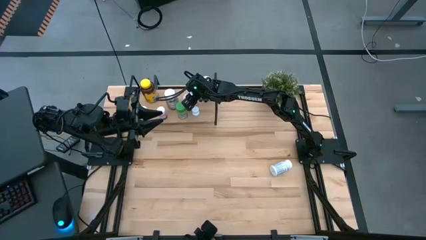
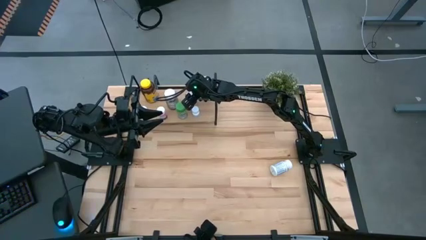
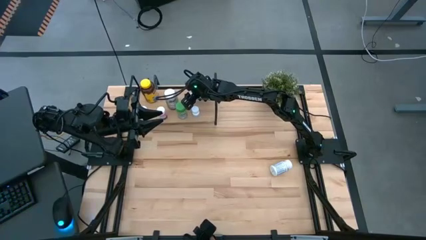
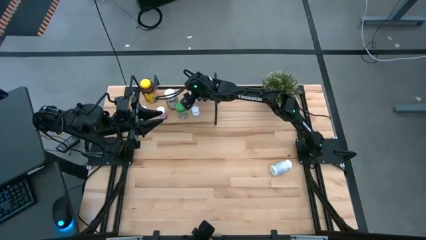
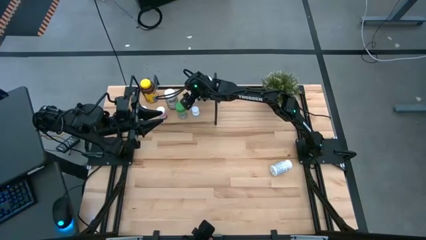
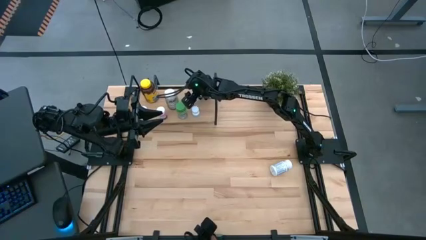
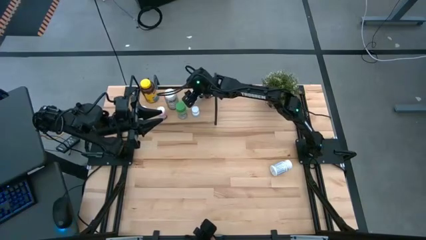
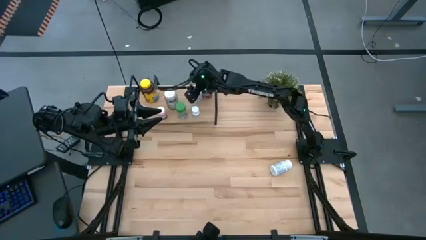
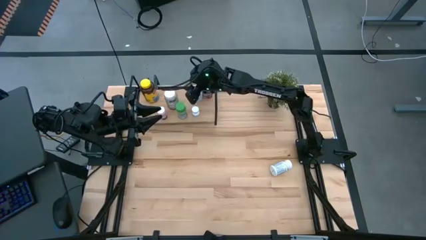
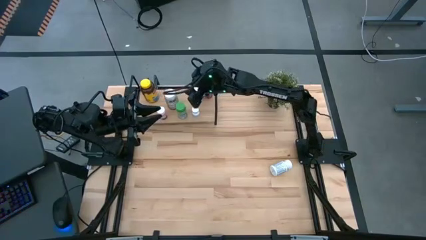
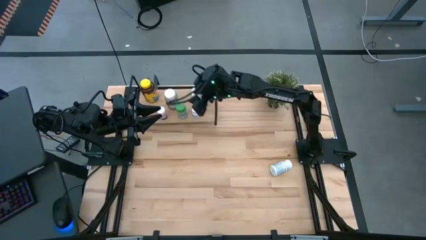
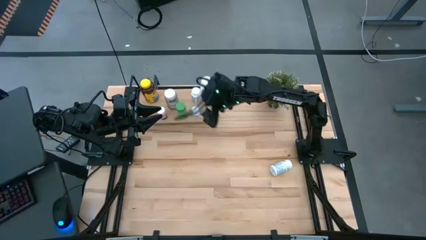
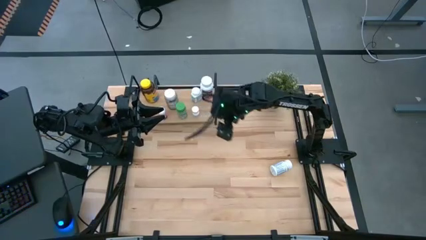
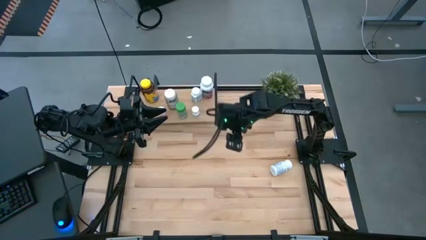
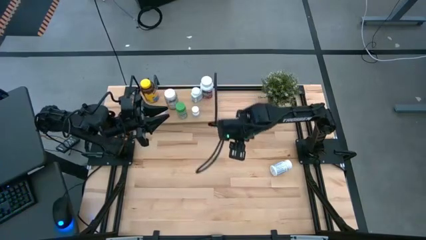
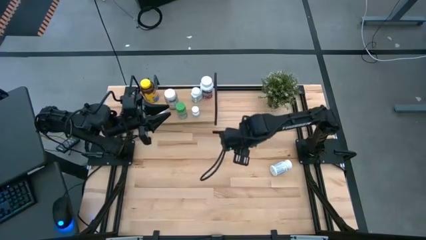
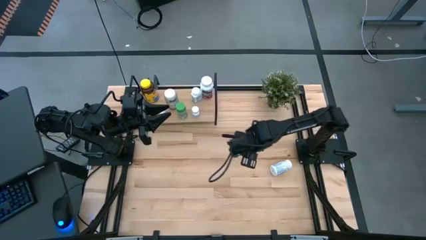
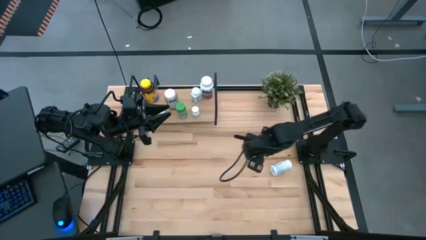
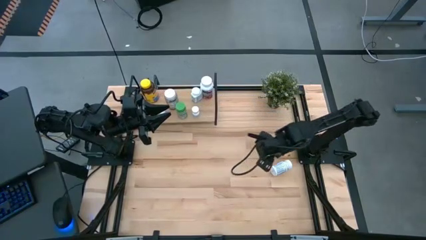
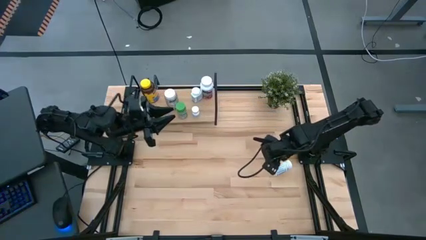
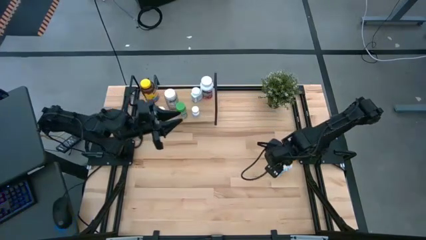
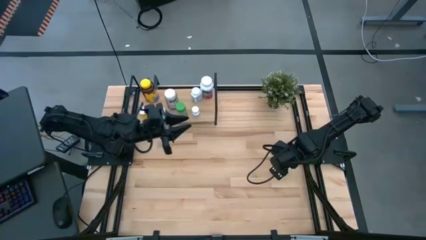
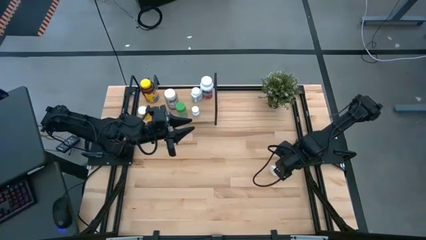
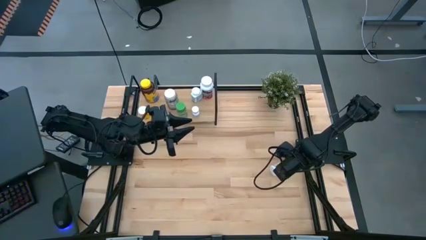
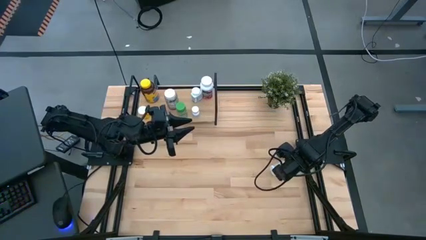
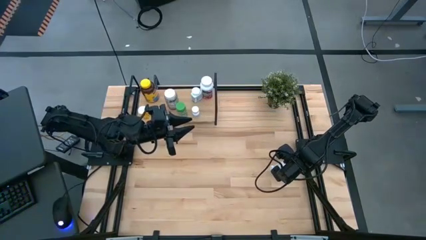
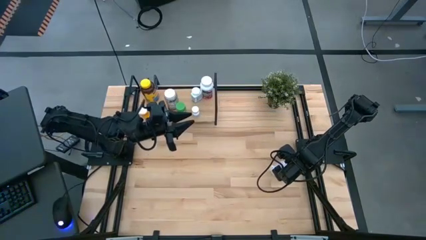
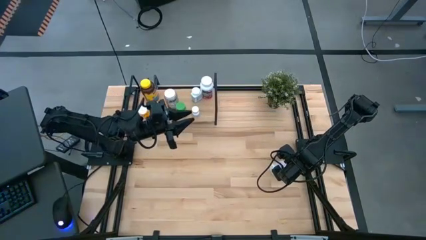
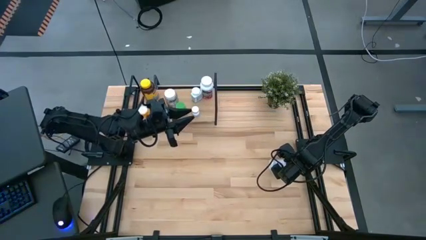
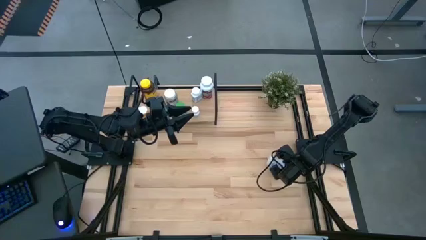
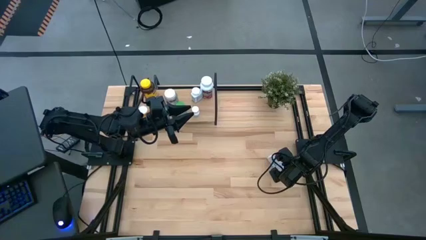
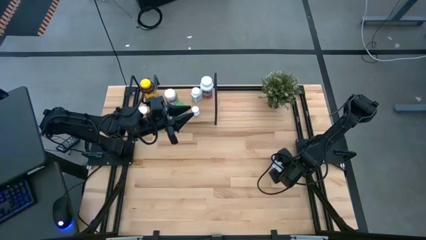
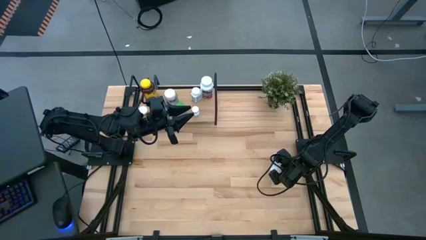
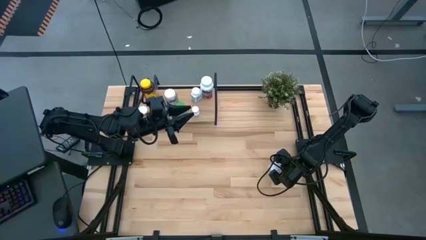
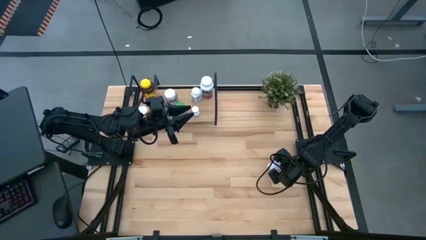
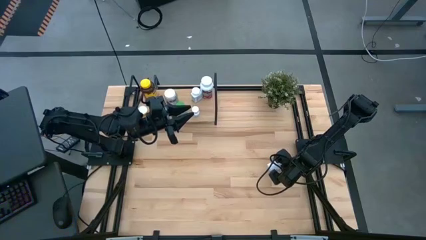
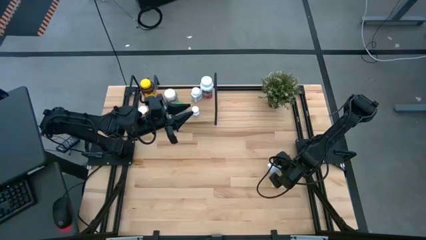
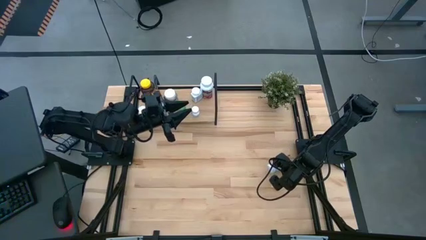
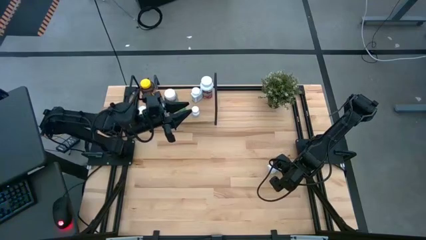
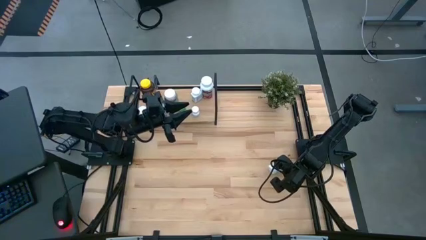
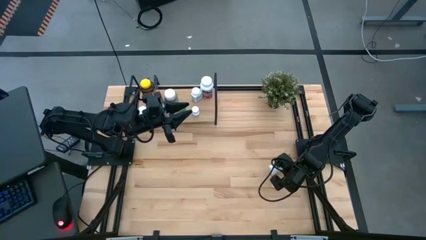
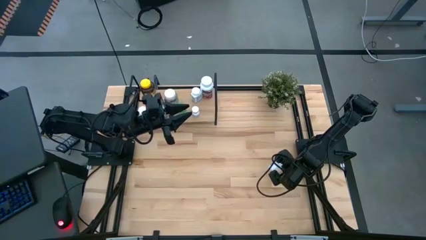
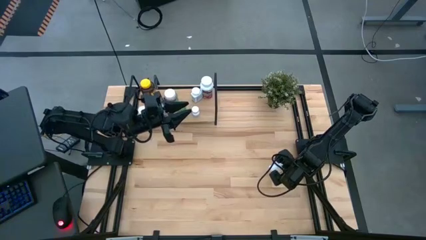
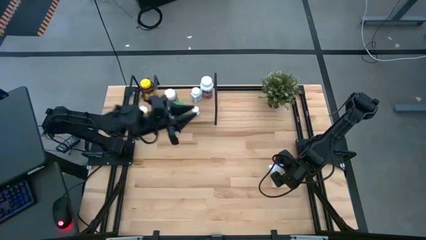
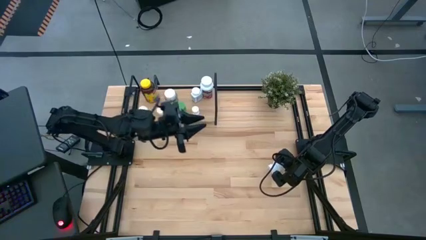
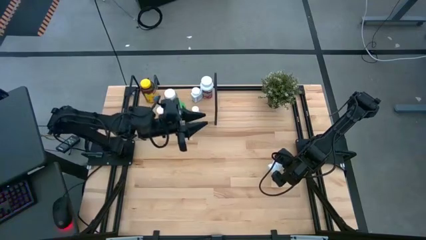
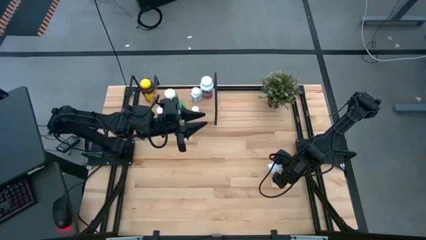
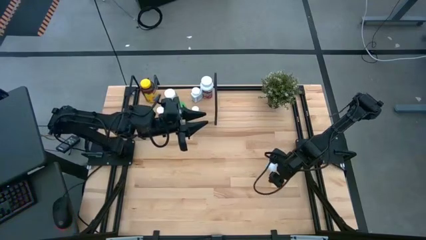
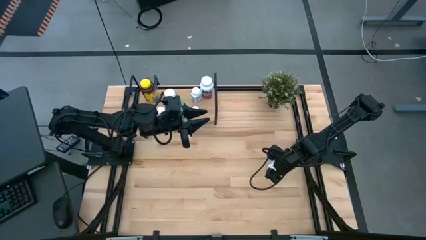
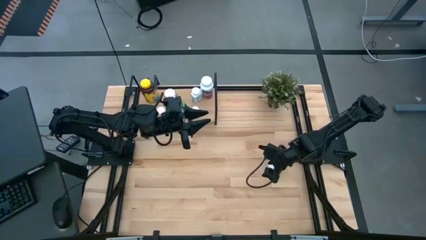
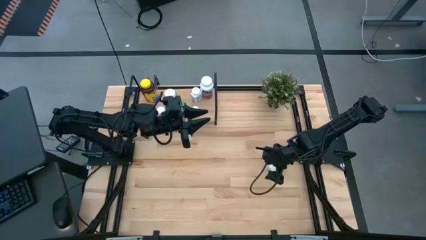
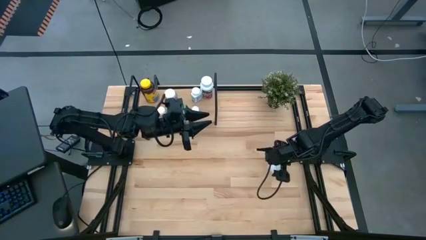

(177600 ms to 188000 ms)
Task: Pick and place medicine bottles onto shelf by color
Put the white medicine bottle on the shelf

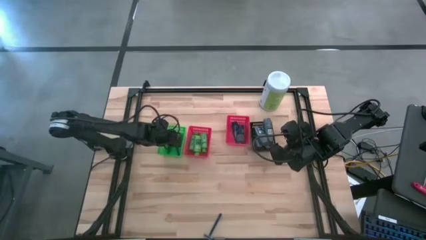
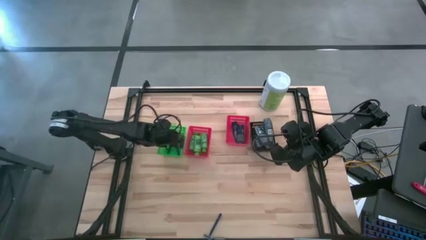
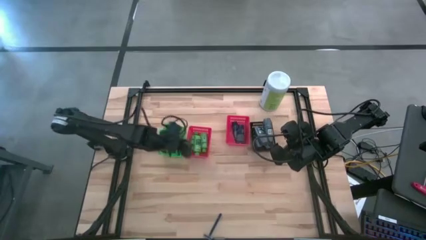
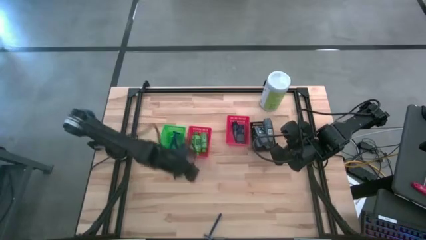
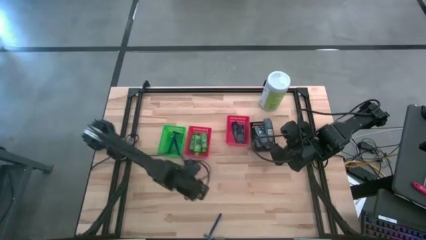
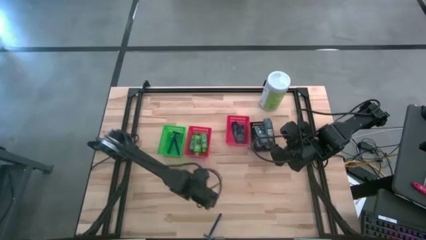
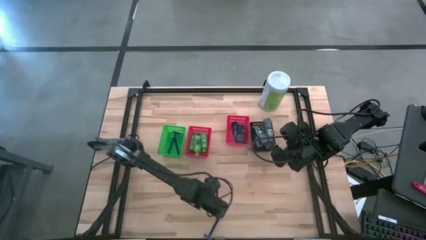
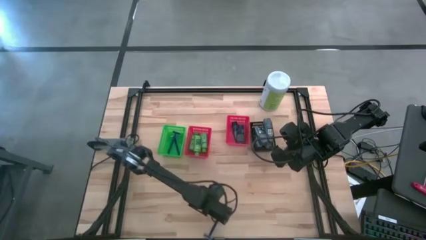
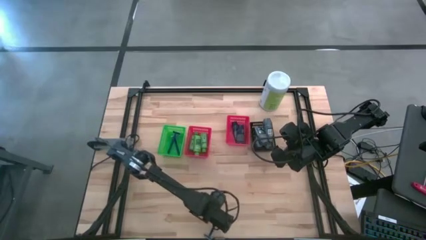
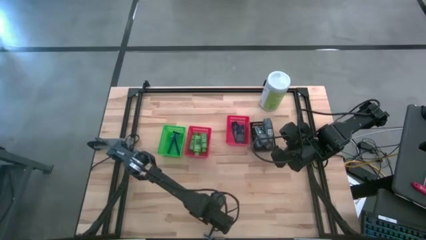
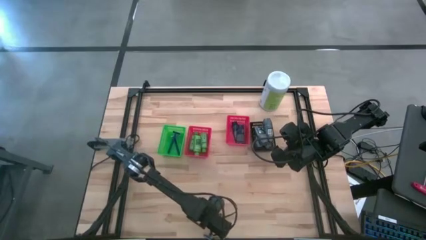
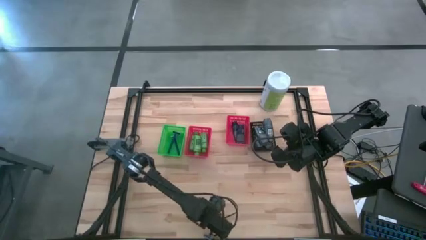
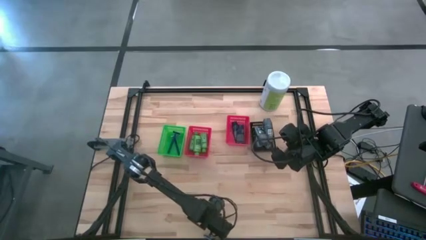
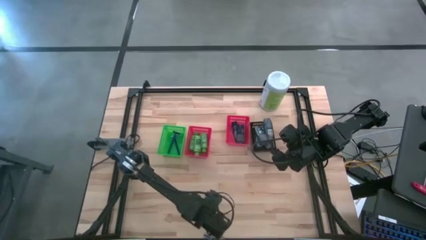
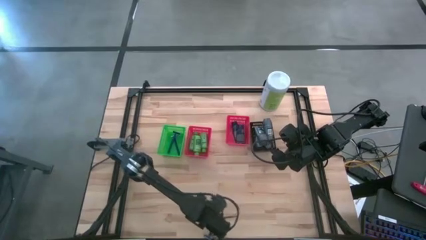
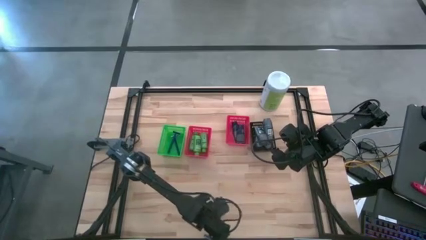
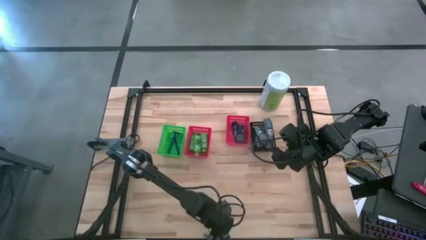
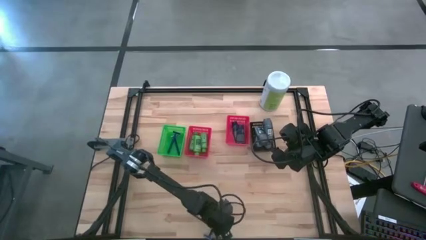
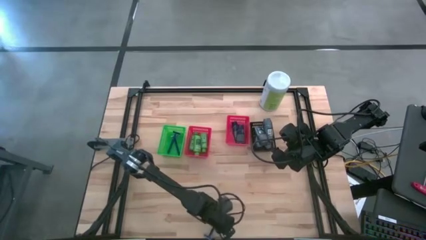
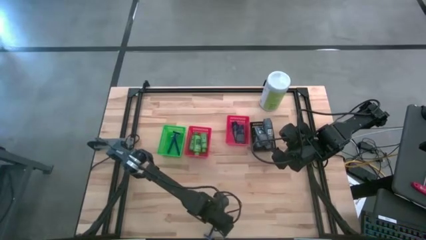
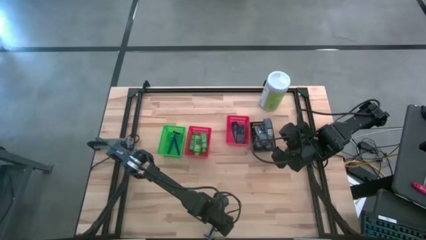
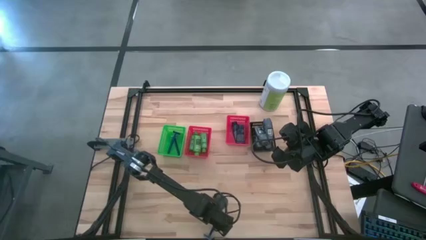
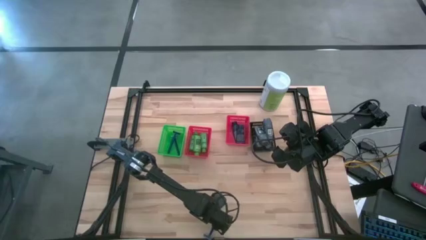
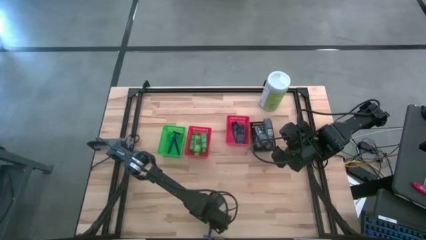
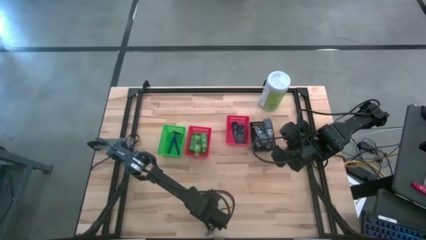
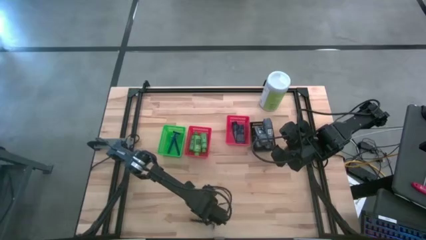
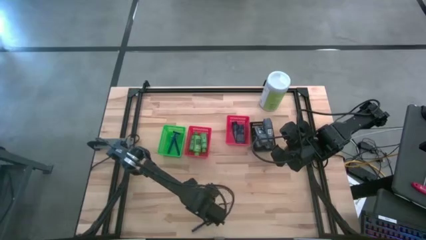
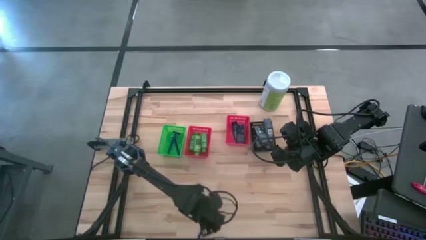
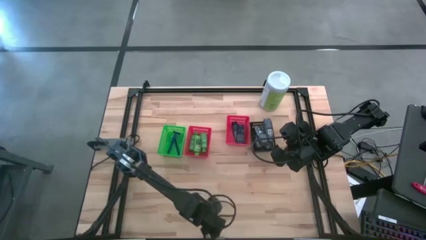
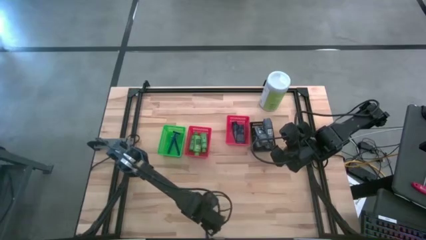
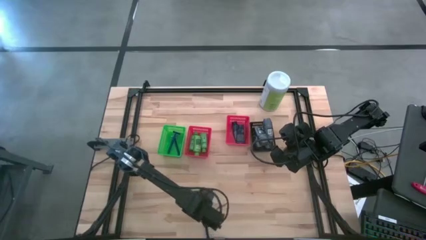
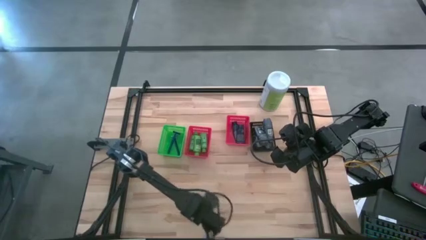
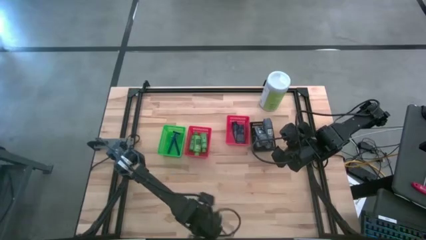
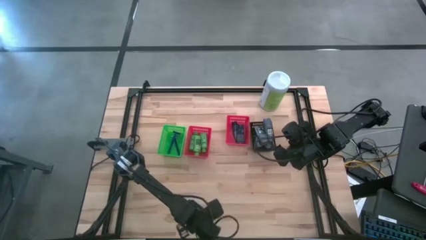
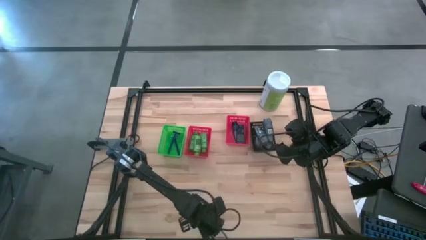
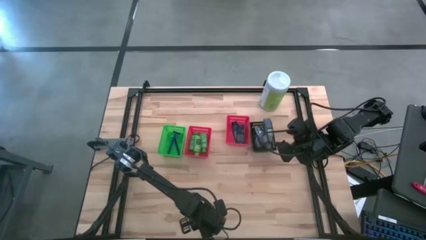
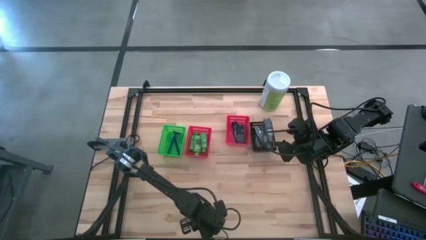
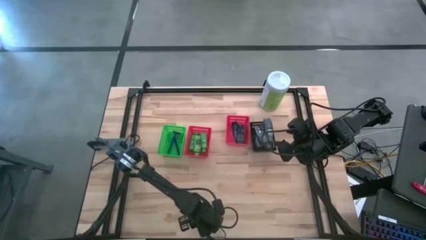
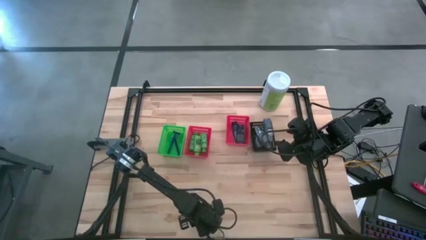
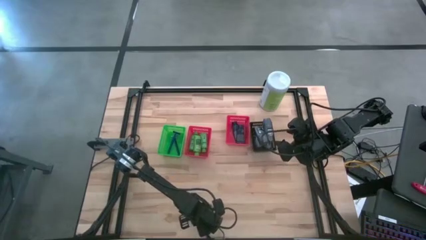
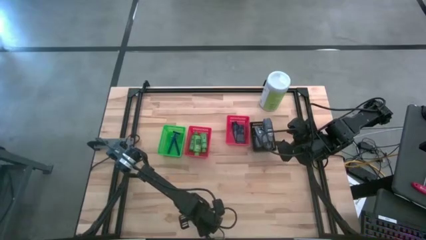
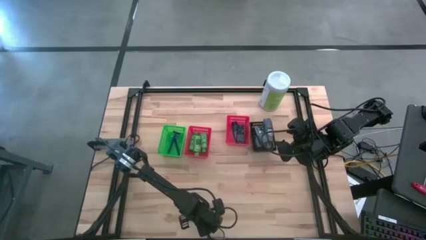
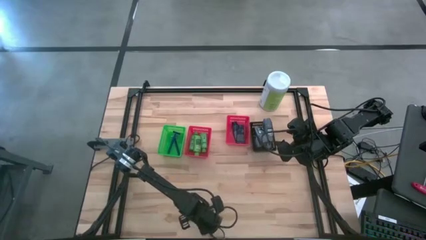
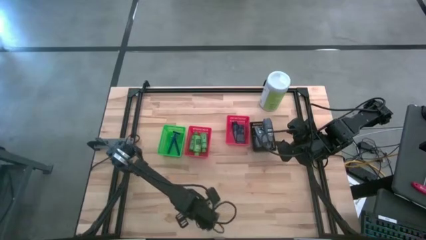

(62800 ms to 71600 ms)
Task: Pick & Place Travel size toiletries
Put the blue razor into the green basket
